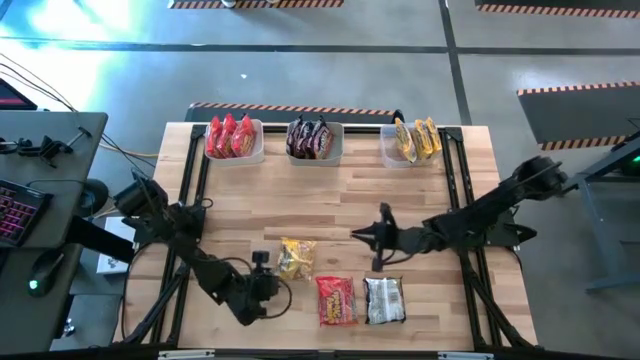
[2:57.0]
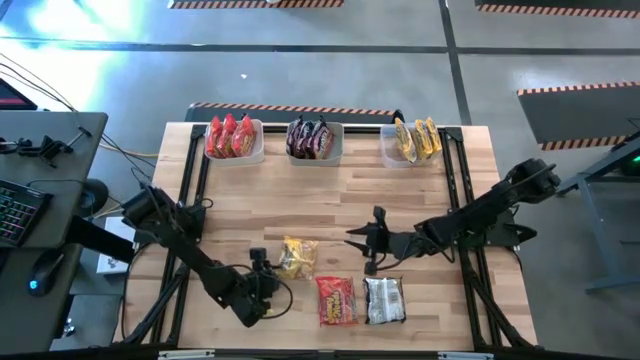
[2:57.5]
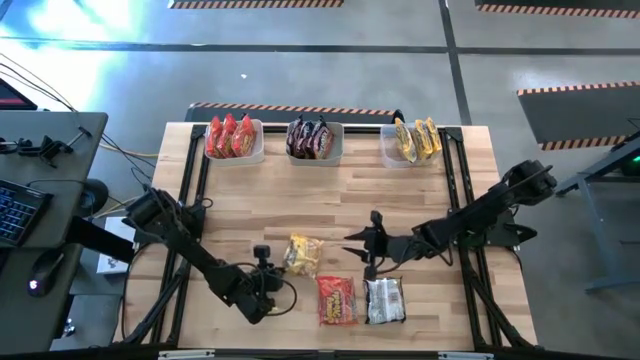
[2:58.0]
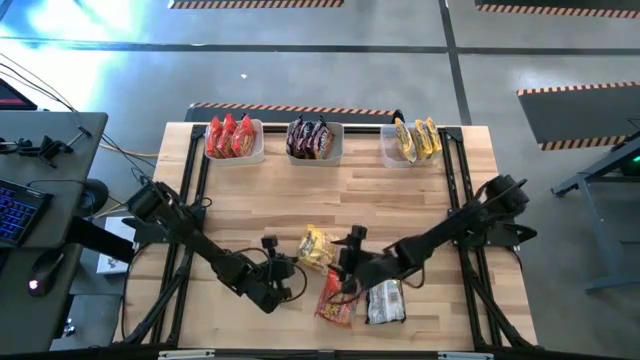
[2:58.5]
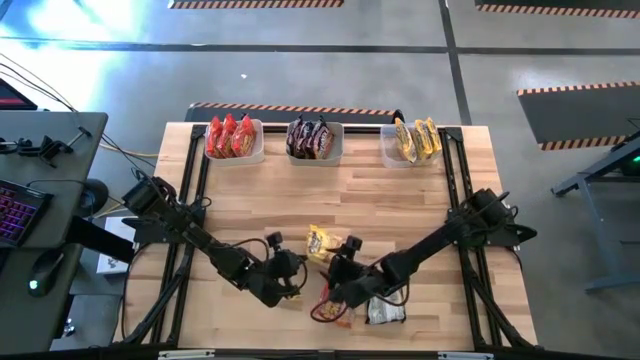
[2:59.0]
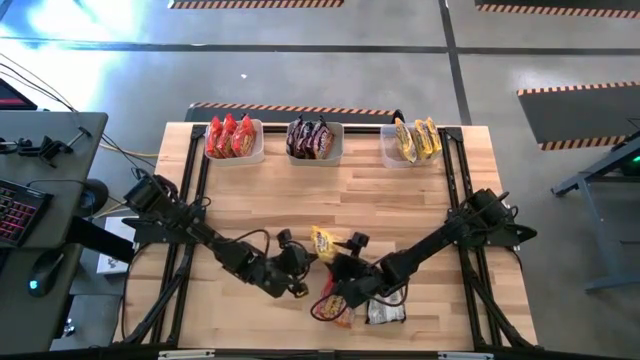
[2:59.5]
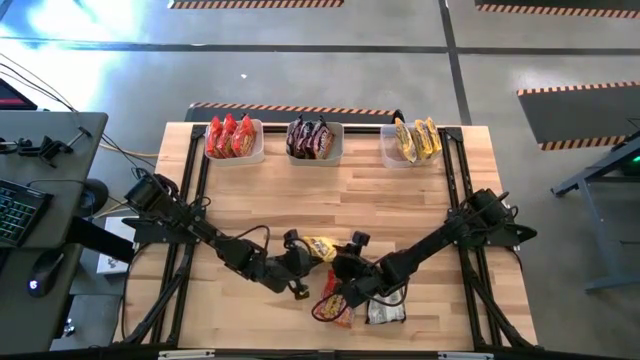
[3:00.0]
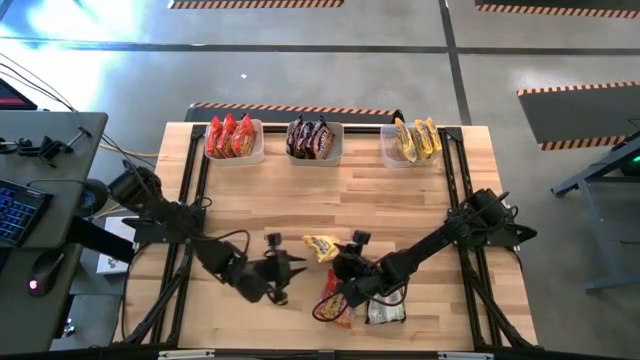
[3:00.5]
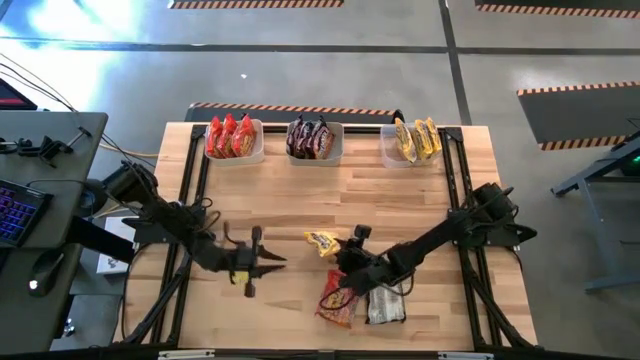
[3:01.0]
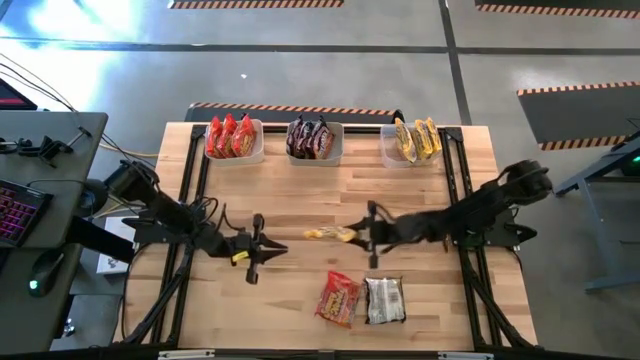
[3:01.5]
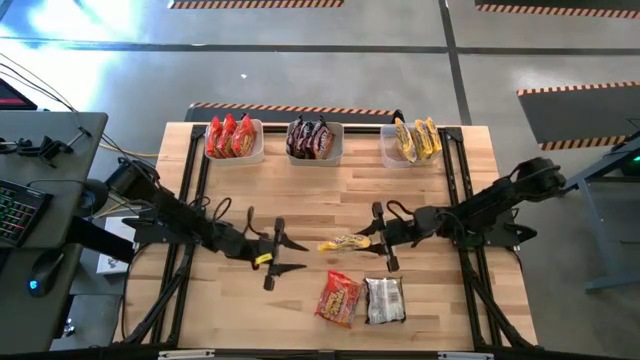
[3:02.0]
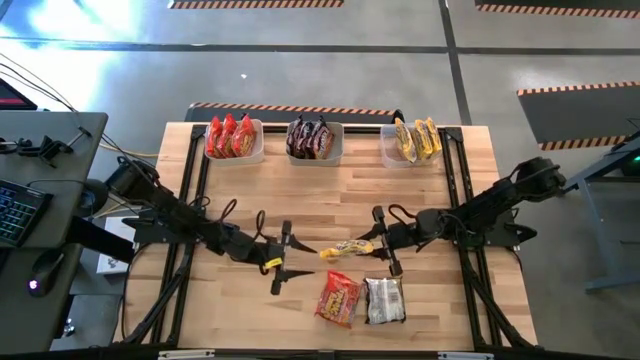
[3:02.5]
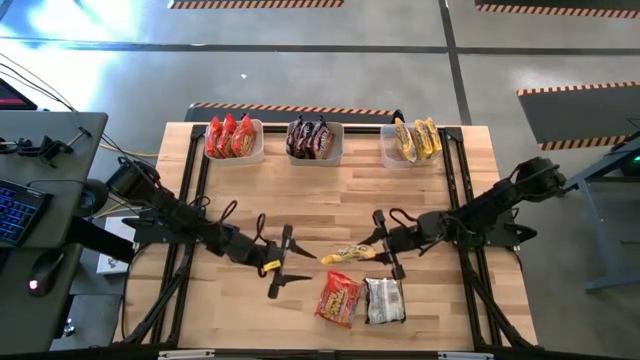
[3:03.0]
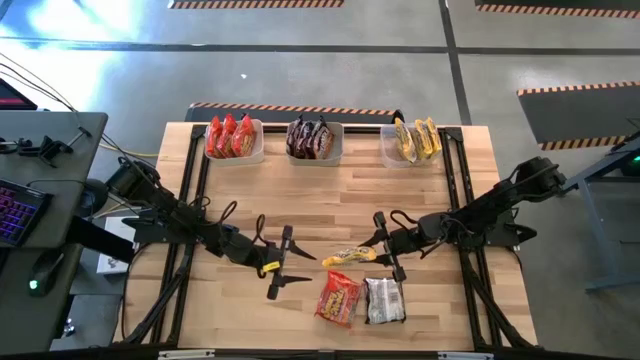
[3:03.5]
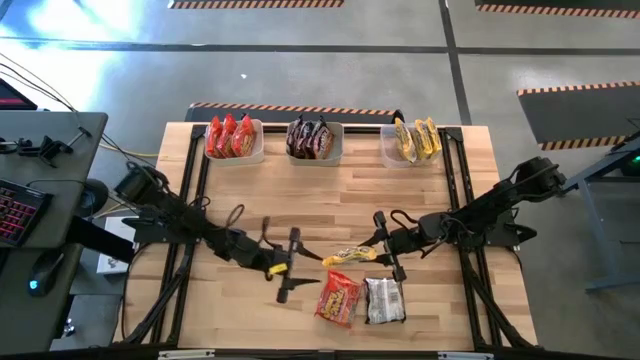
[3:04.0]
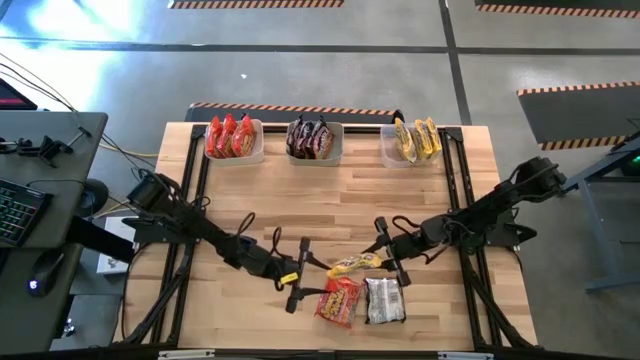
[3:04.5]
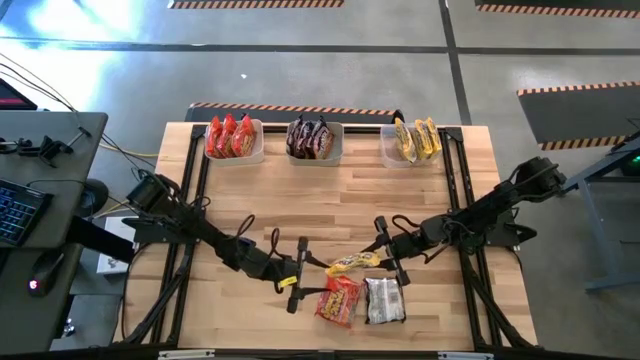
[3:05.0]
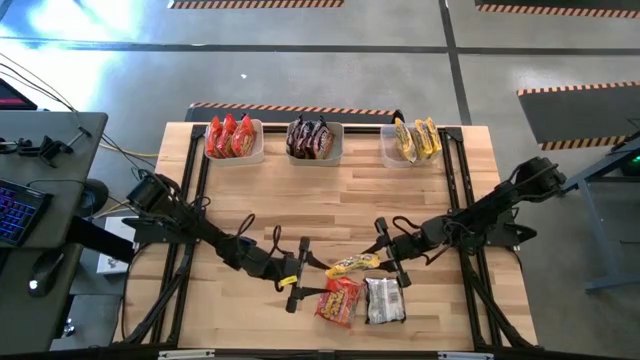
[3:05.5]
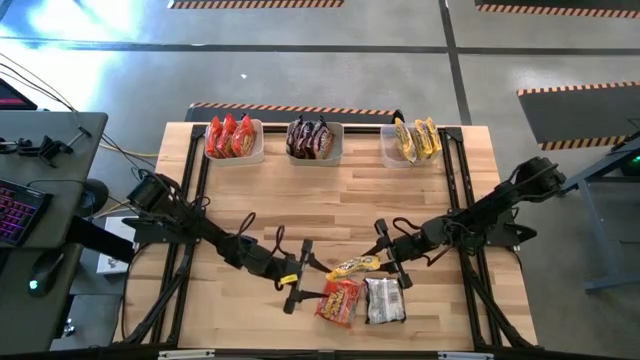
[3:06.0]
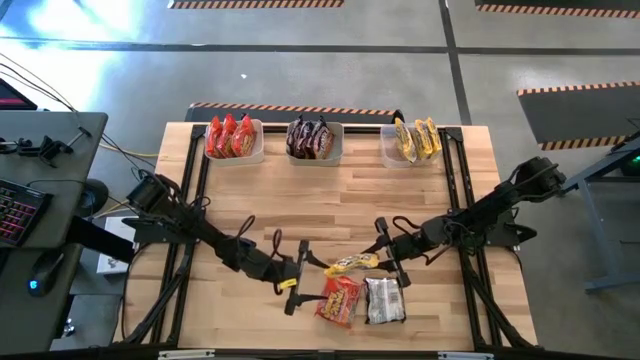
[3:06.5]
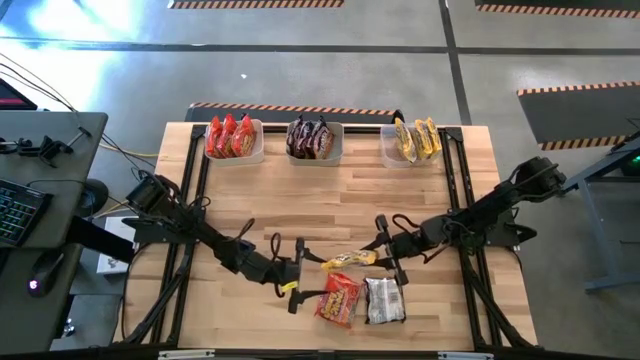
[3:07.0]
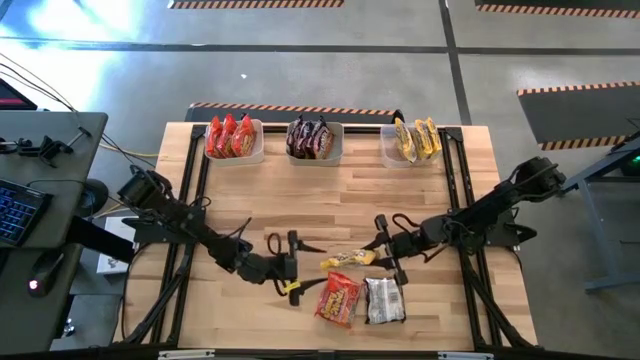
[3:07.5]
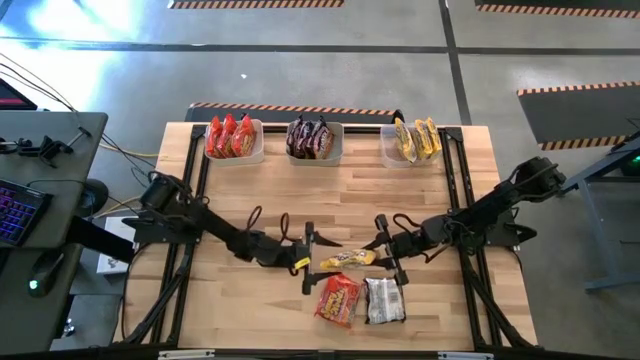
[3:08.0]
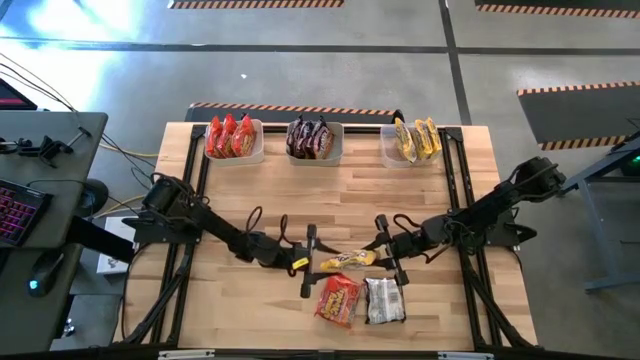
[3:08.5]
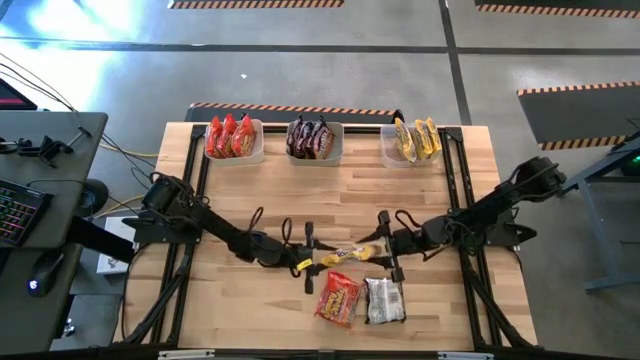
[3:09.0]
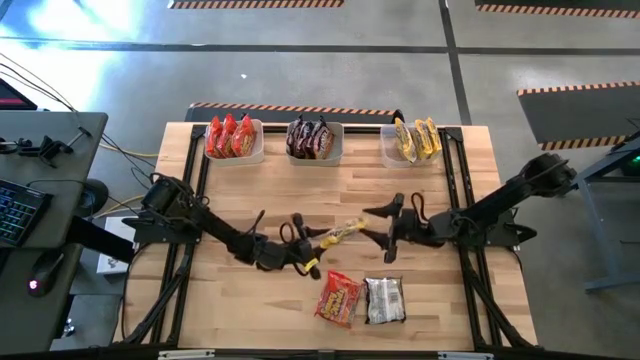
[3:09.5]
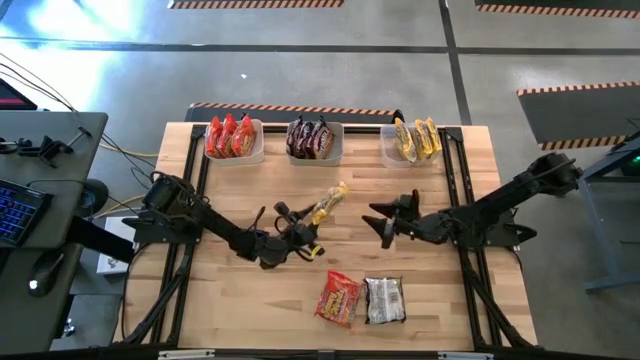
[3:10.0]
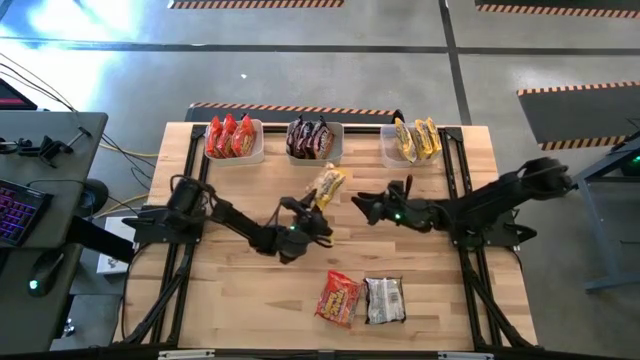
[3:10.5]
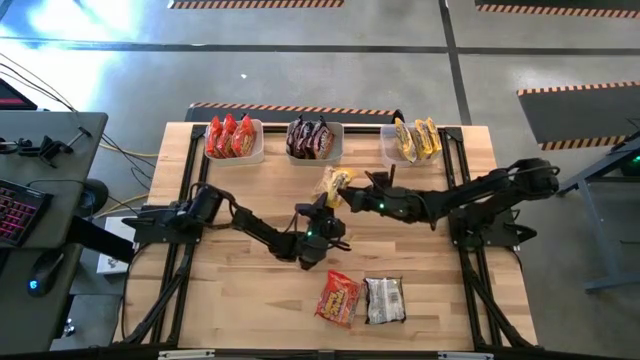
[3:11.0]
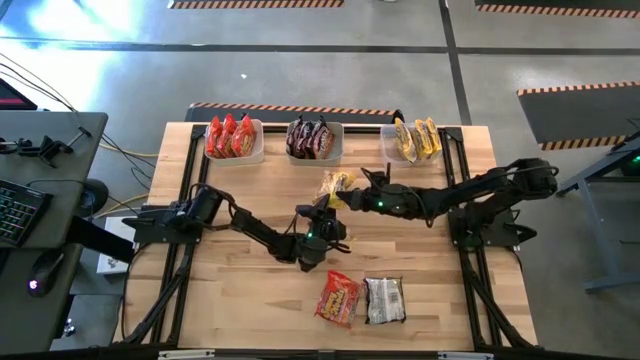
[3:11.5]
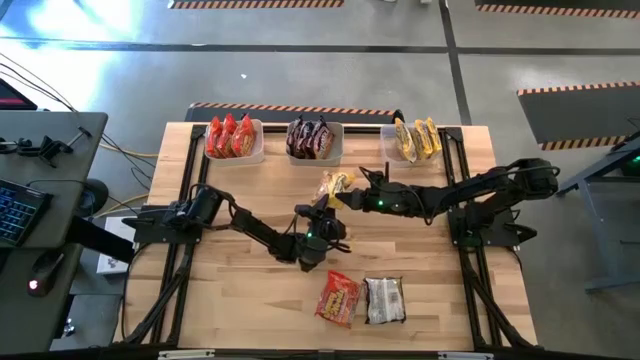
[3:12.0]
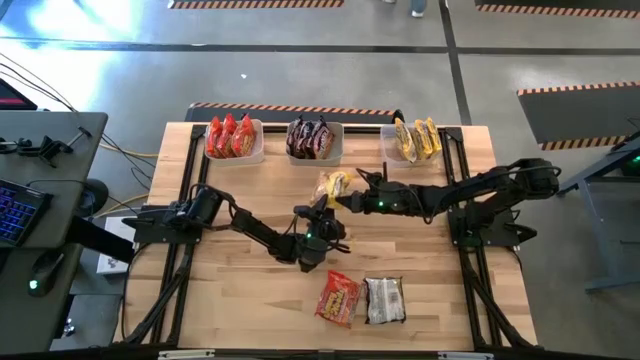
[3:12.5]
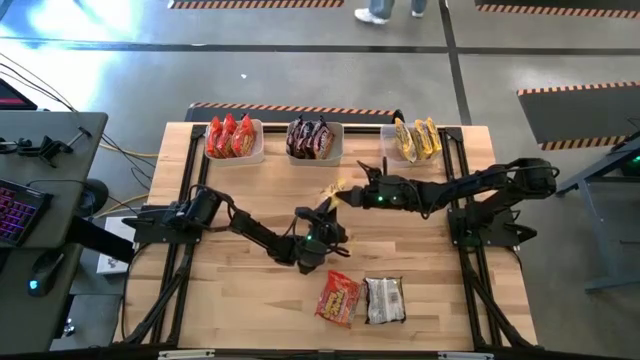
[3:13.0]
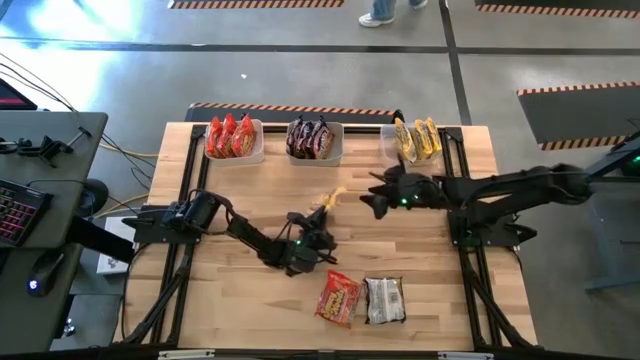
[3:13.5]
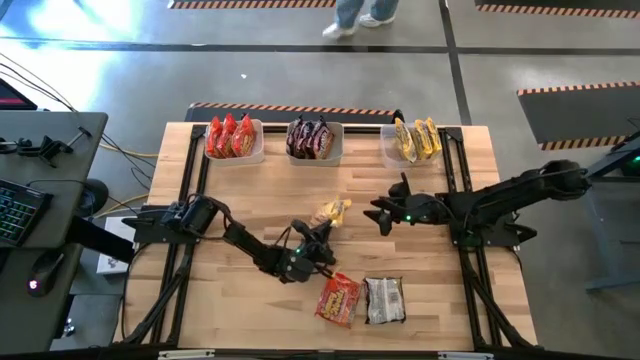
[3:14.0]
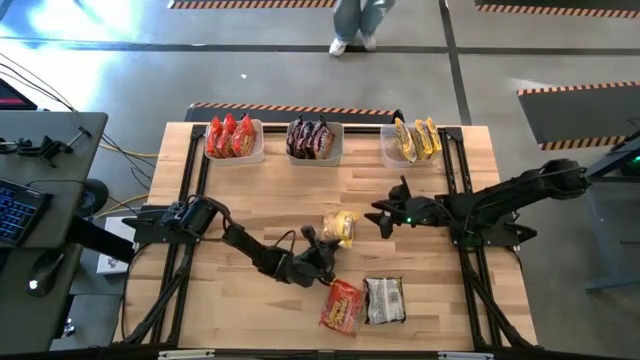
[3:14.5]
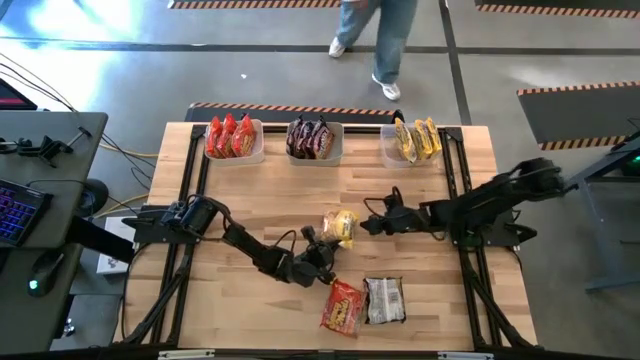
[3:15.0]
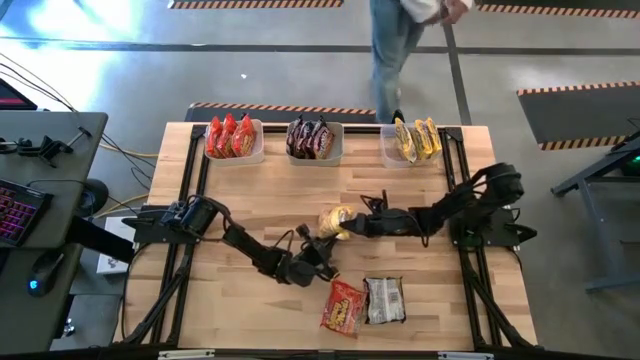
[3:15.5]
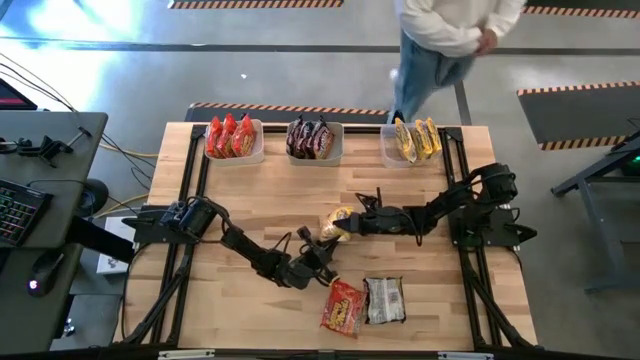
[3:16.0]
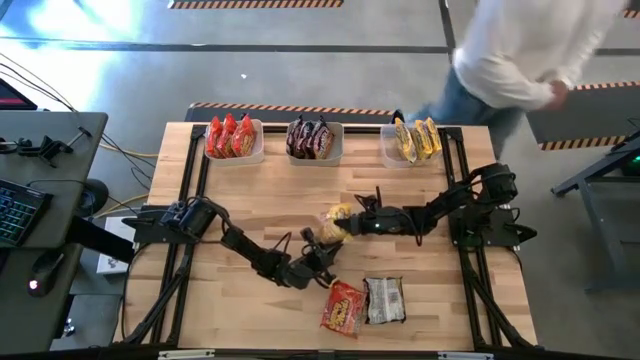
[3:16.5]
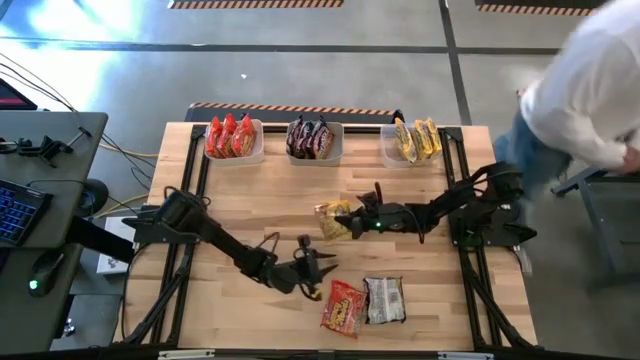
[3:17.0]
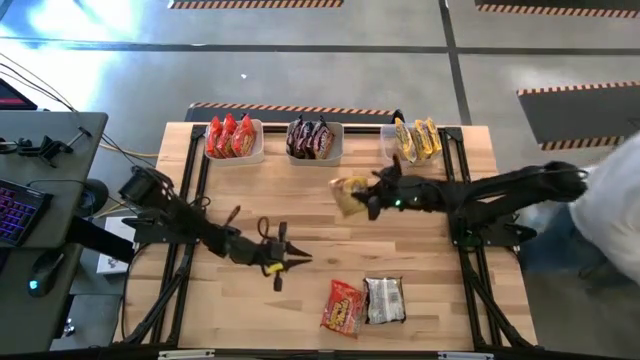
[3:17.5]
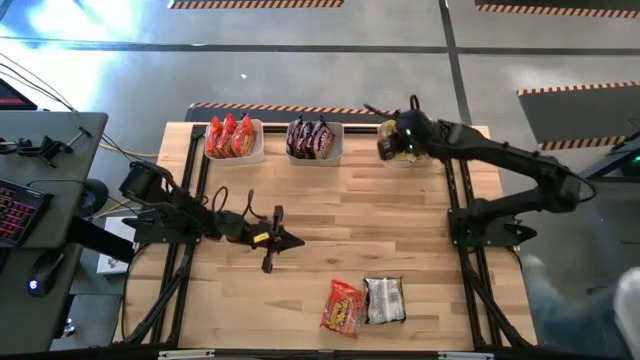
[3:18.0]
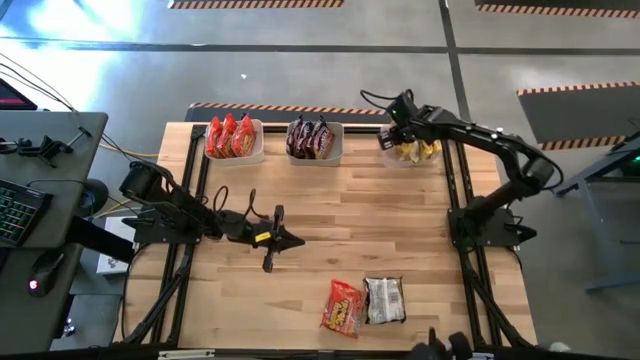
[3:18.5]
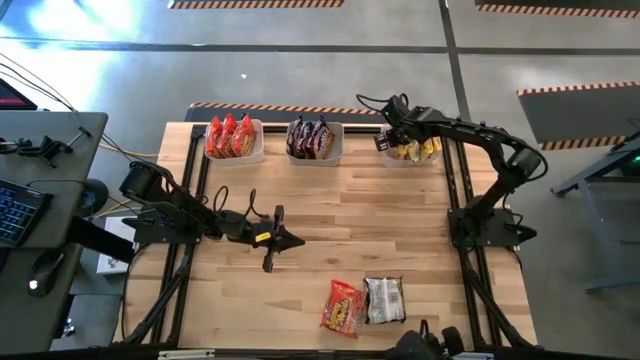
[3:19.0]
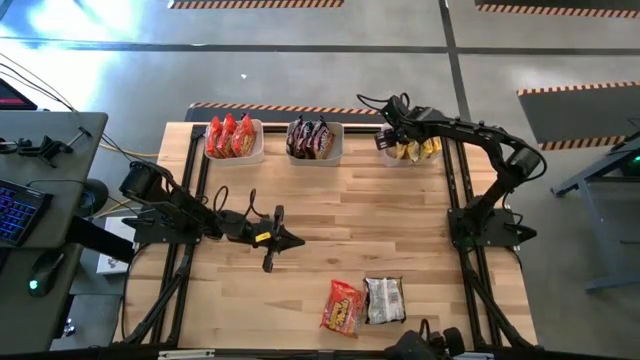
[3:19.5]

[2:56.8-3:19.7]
Task: Sort Maruchan noodles
Put the yellow noodle pack into the transparent bin
